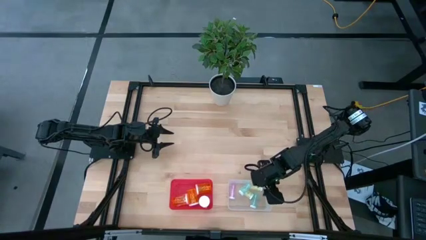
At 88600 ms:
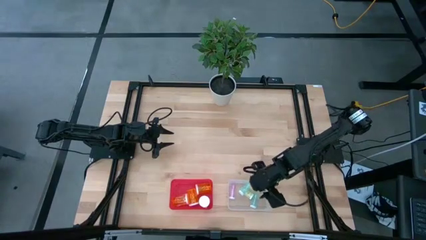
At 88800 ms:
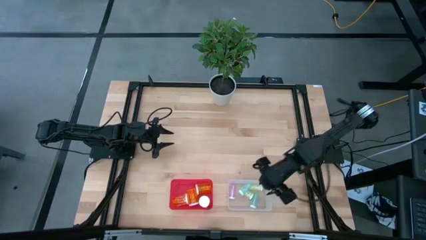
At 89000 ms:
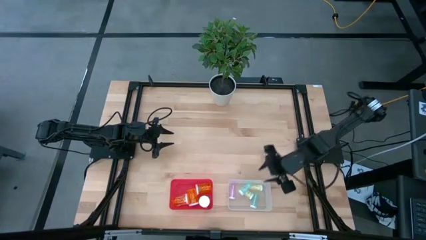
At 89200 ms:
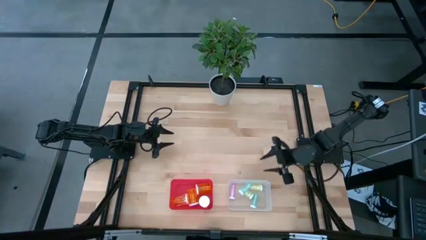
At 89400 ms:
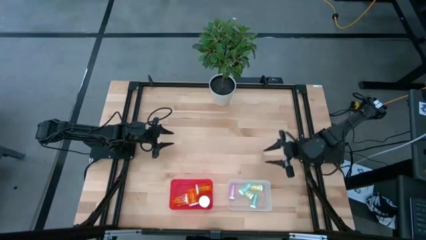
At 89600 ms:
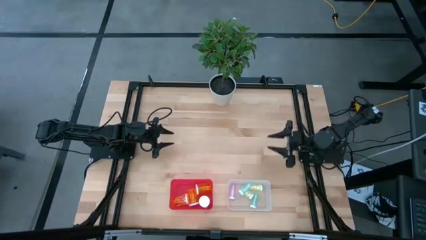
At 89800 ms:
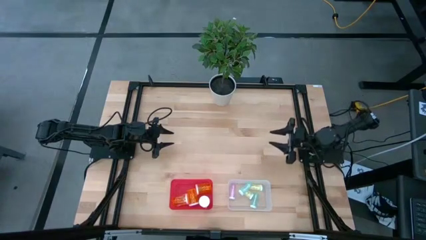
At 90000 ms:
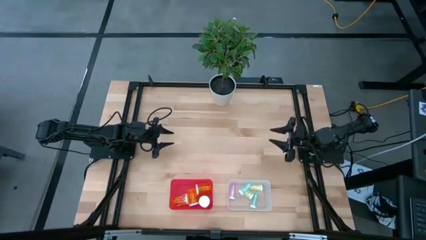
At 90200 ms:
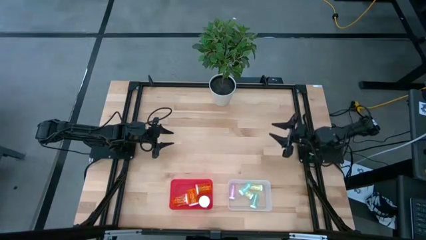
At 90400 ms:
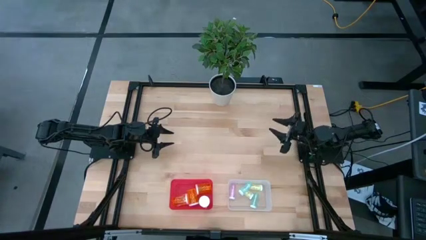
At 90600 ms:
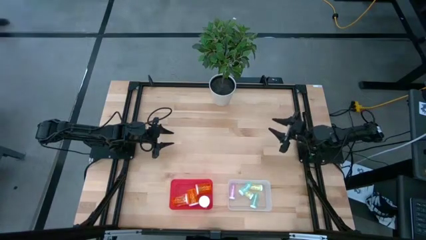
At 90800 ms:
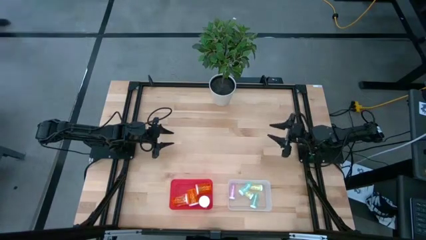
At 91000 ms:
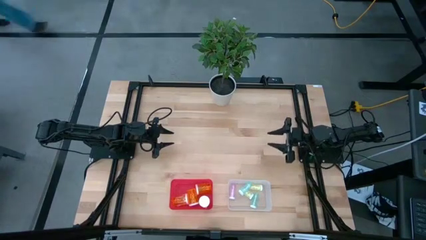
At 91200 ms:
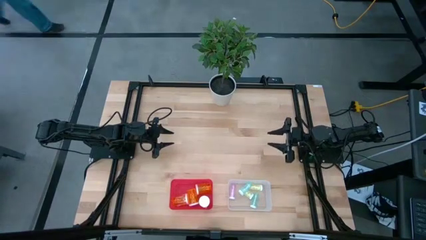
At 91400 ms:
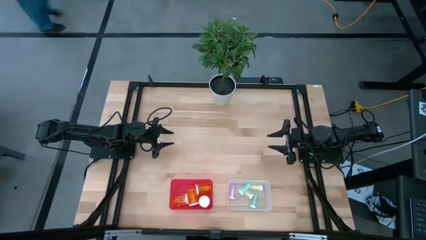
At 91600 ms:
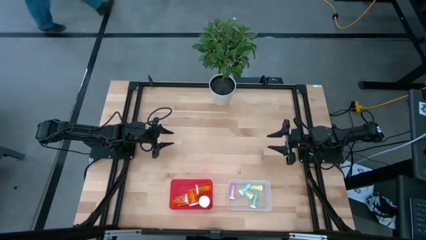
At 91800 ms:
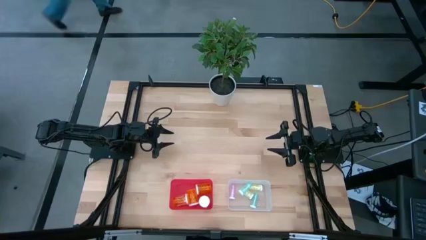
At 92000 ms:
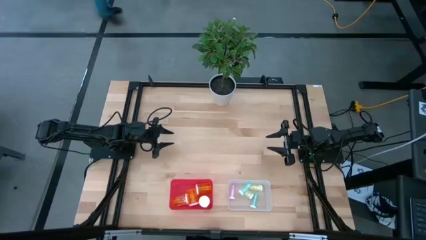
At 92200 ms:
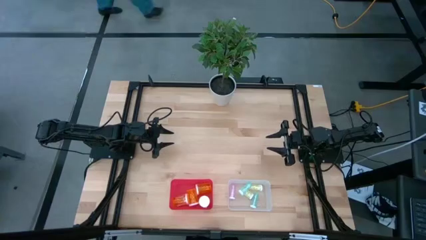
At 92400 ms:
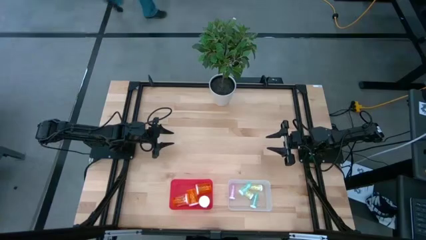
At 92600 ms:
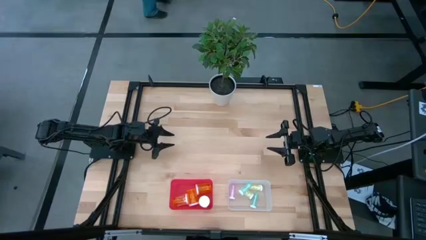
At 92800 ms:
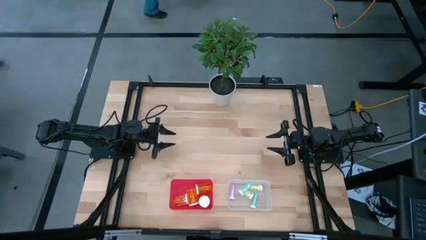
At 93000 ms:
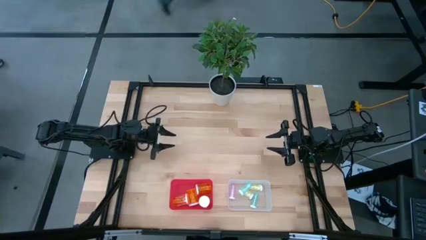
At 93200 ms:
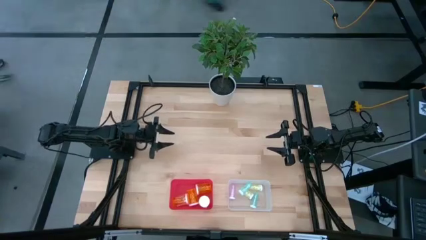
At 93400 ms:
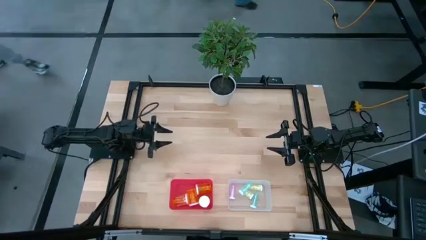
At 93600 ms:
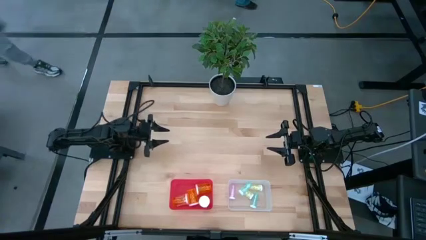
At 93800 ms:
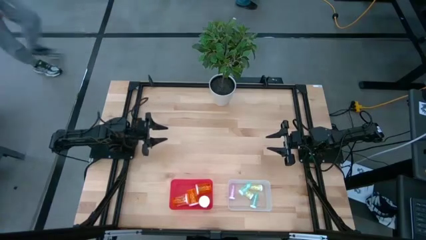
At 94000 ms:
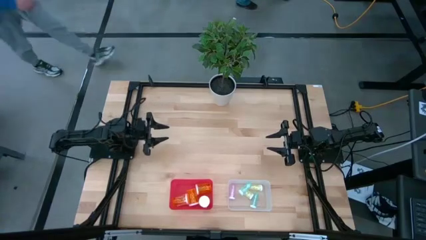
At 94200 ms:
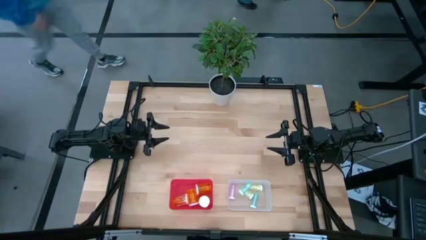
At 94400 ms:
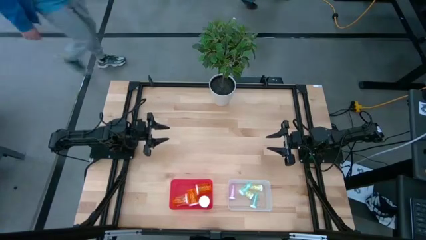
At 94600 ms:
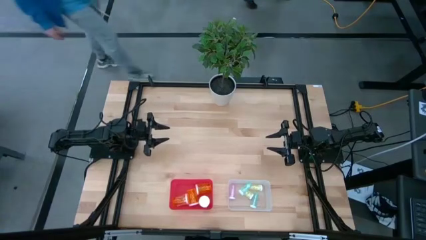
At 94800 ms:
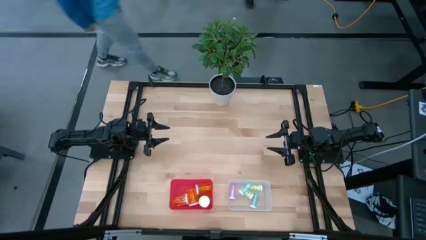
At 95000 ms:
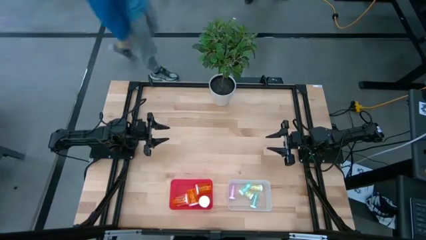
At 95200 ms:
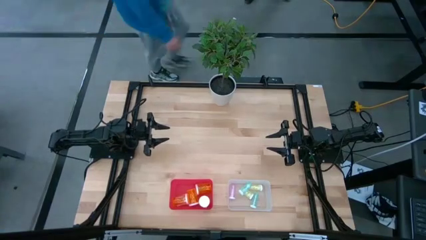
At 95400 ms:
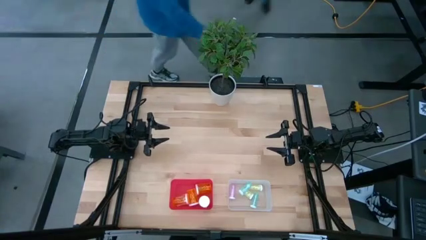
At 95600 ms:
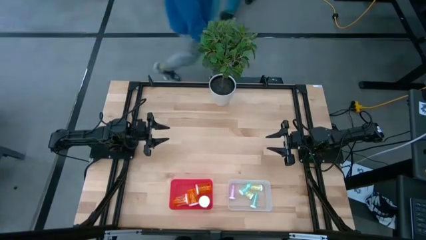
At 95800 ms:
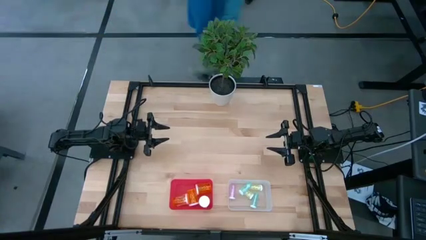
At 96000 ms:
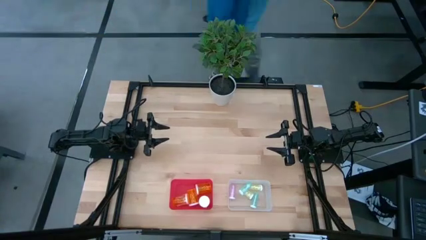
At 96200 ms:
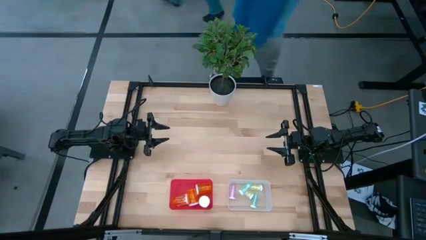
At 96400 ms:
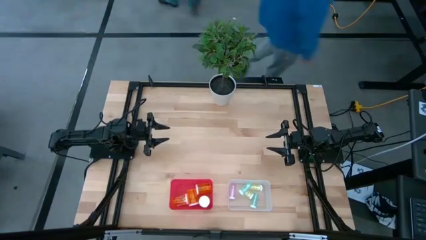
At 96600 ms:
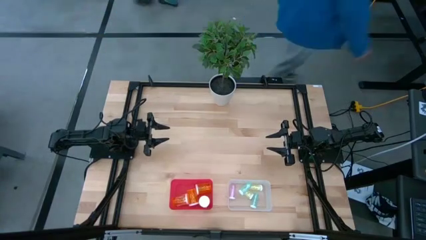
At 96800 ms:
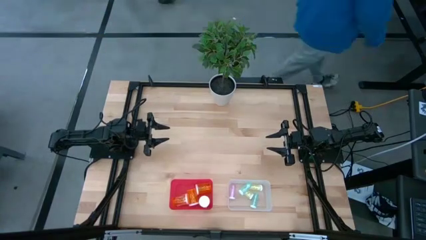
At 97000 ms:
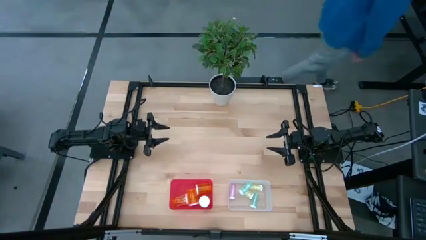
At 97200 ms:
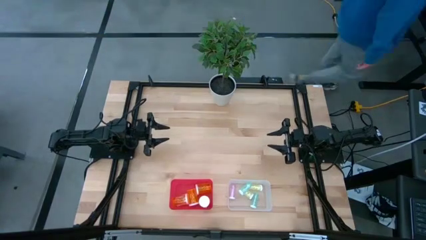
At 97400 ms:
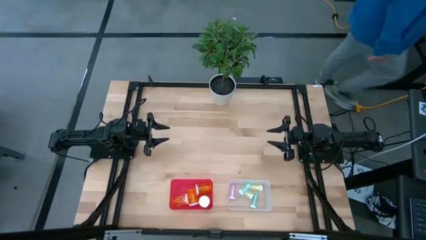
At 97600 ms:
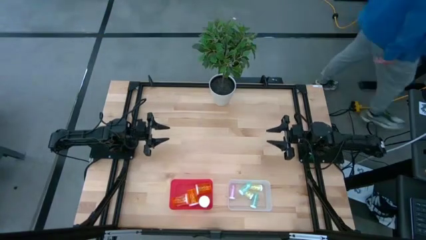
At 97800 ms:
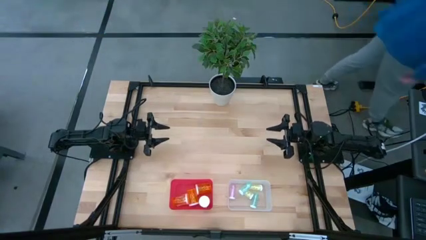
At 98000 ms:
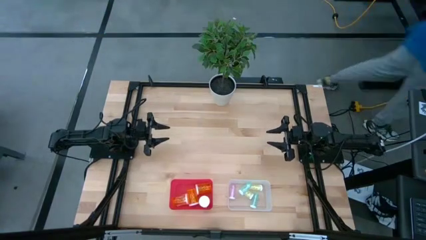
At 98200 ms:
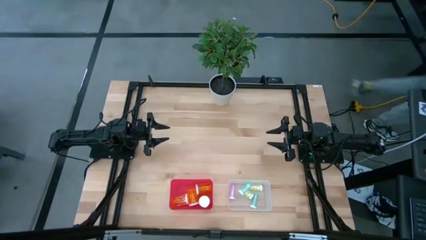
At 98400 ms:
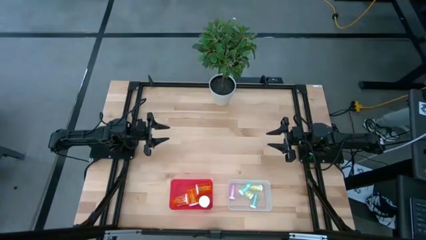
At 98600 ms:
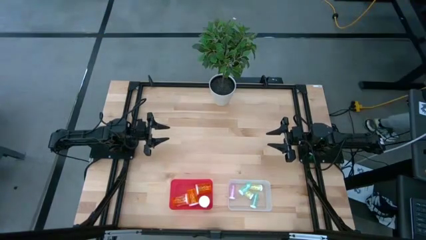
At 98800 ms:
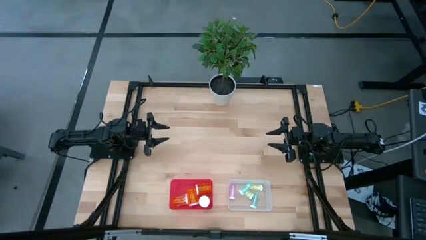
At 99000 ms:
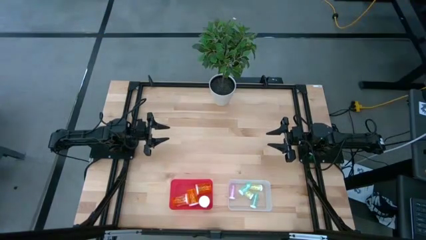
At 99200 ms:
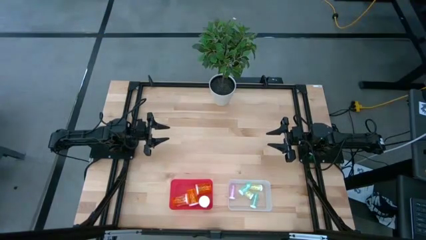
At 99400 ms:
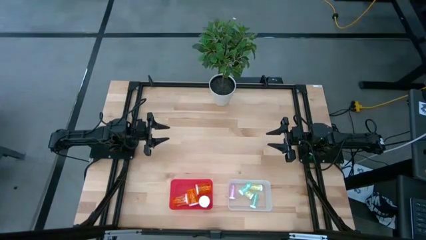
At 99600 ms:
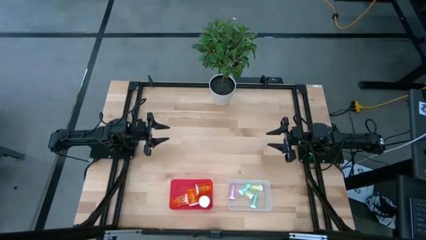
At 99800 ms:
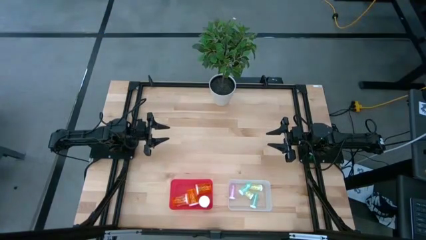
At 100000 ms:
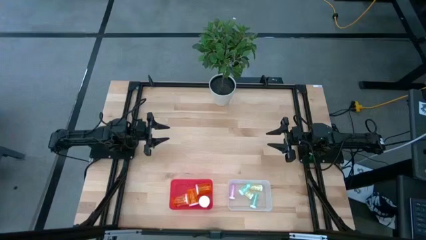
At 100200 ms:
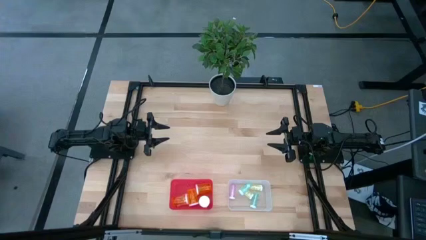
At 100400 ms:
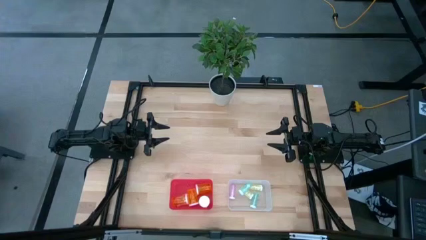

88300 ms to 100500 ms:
Task: Pick and place medicine bottles into bin by pill shape (circle, oval)
Return to Home Position
